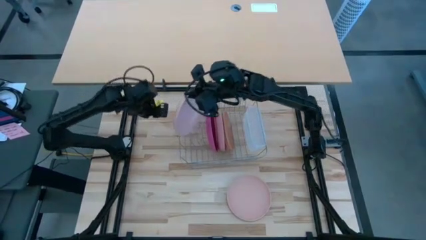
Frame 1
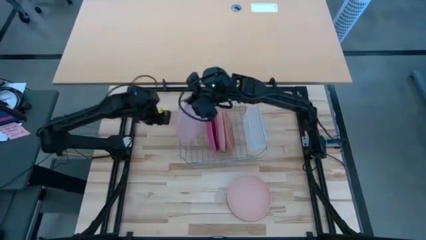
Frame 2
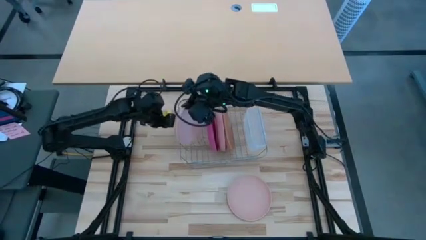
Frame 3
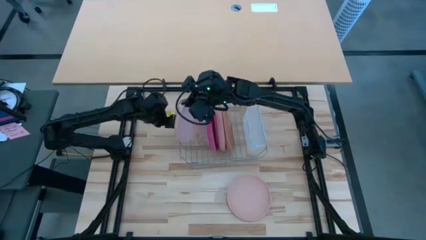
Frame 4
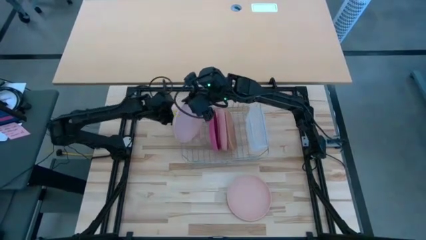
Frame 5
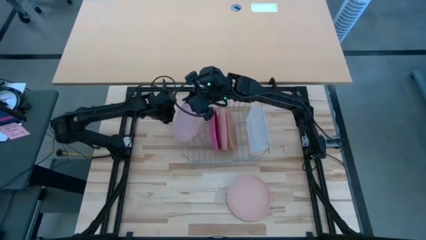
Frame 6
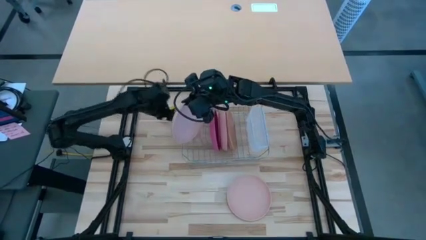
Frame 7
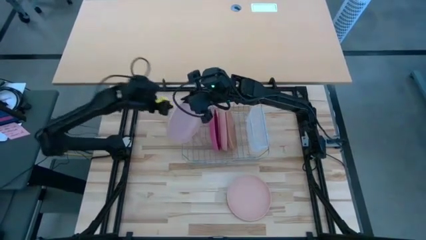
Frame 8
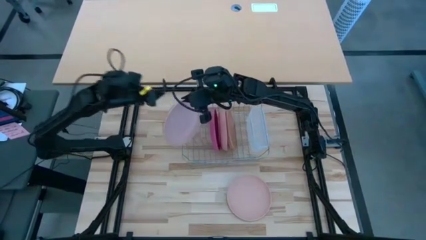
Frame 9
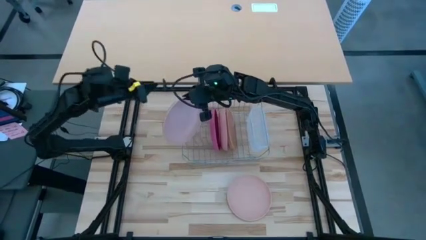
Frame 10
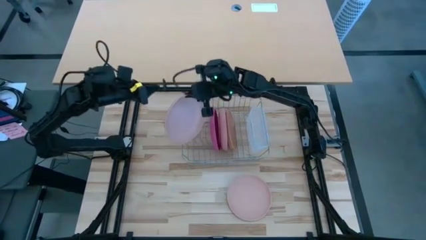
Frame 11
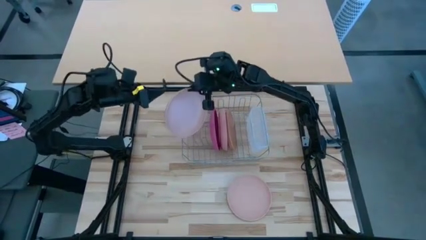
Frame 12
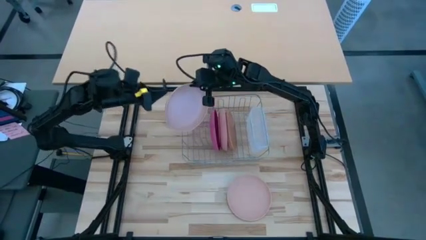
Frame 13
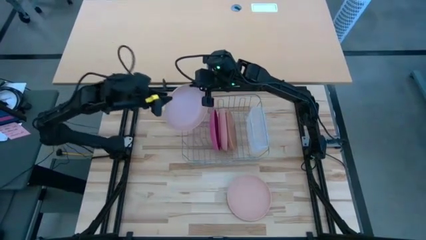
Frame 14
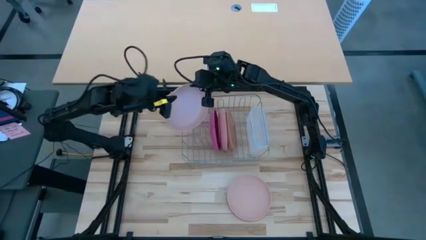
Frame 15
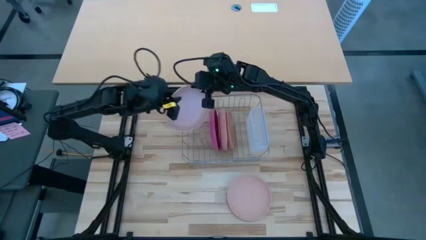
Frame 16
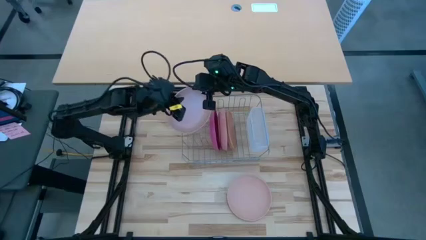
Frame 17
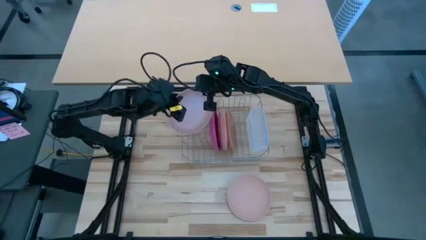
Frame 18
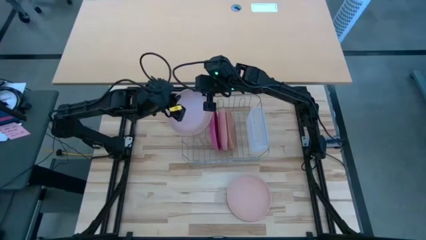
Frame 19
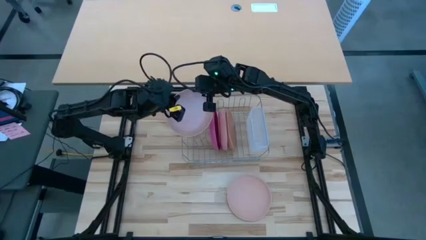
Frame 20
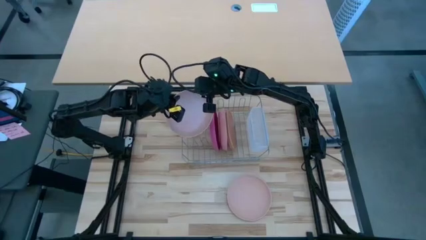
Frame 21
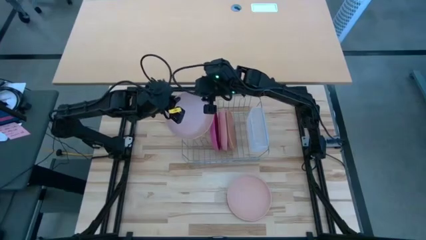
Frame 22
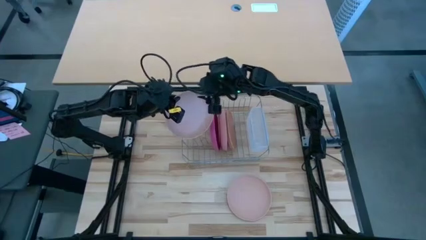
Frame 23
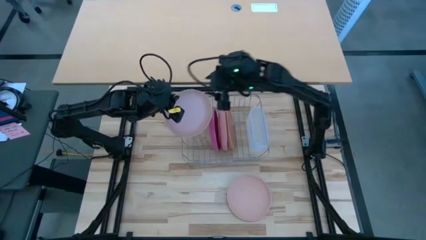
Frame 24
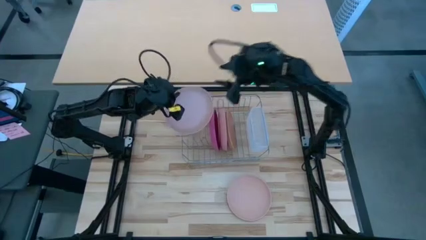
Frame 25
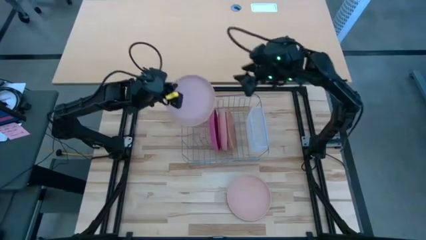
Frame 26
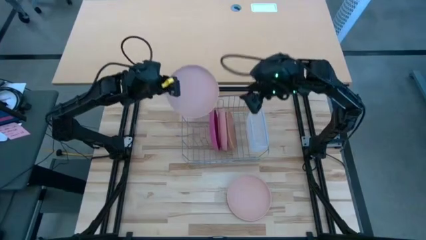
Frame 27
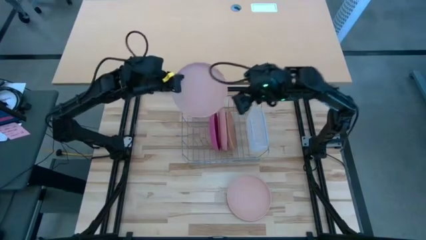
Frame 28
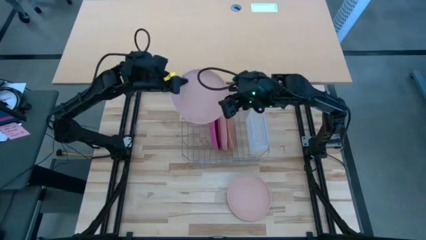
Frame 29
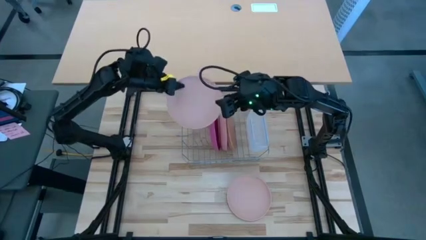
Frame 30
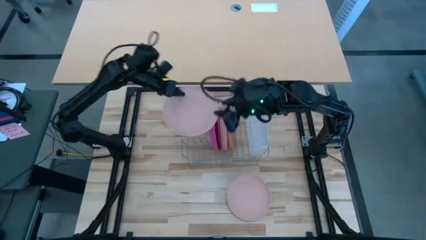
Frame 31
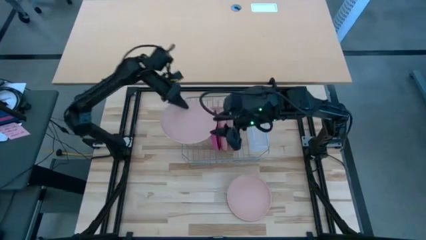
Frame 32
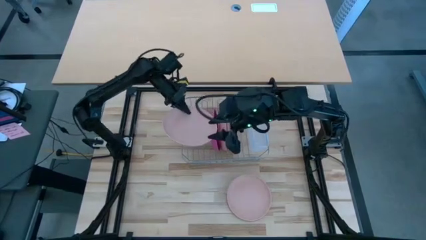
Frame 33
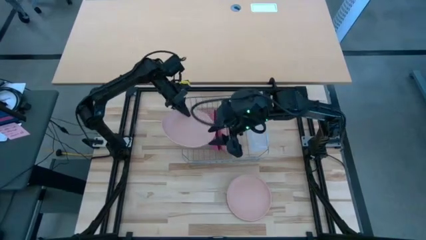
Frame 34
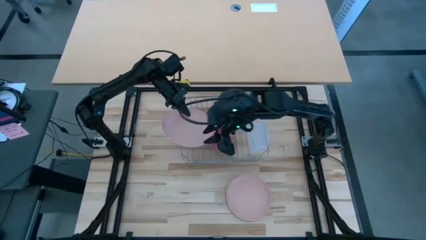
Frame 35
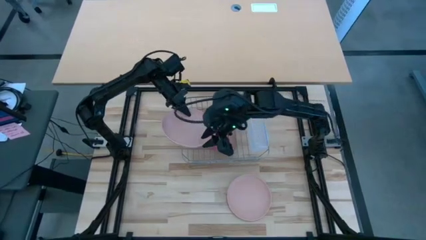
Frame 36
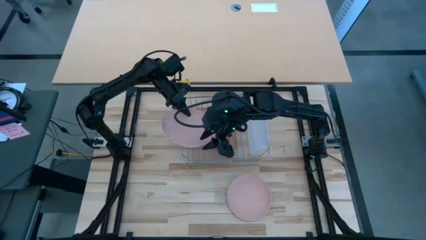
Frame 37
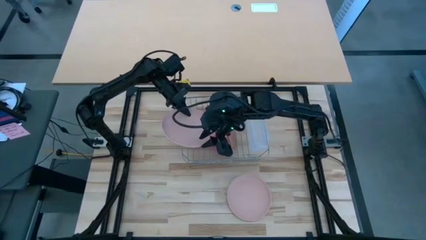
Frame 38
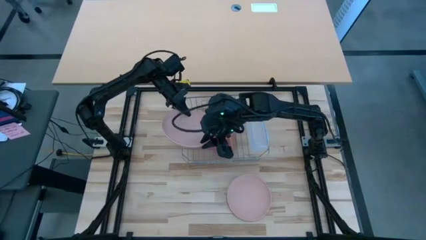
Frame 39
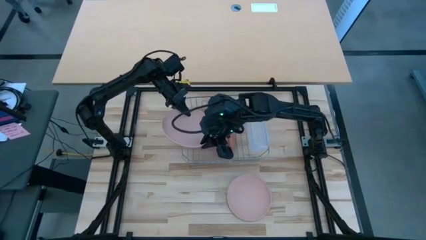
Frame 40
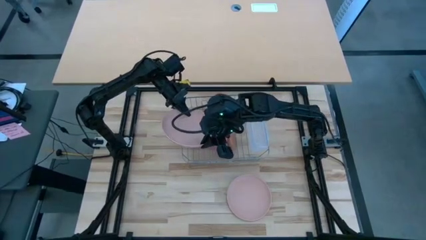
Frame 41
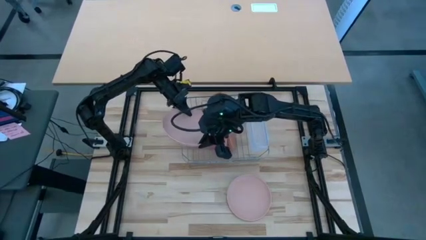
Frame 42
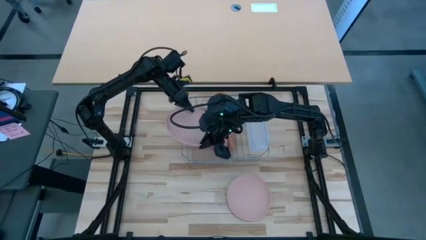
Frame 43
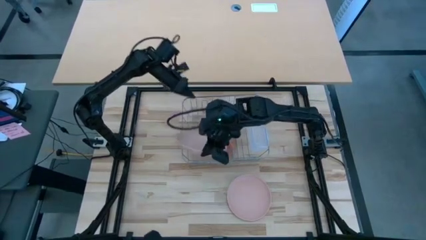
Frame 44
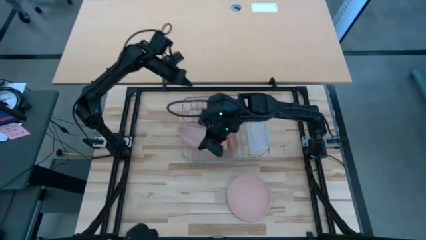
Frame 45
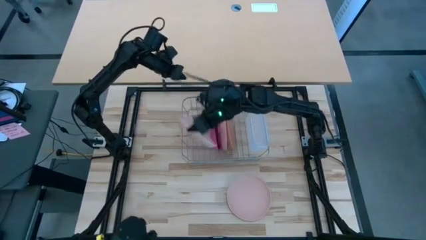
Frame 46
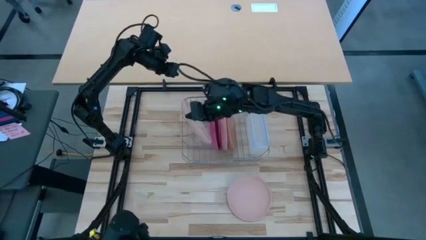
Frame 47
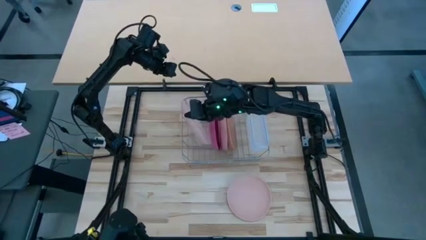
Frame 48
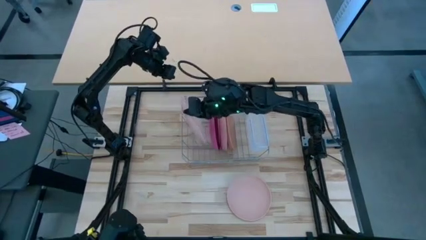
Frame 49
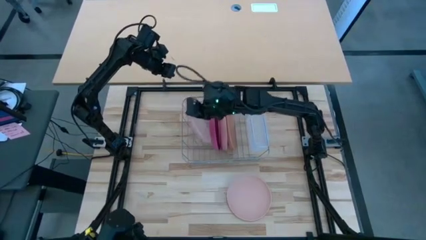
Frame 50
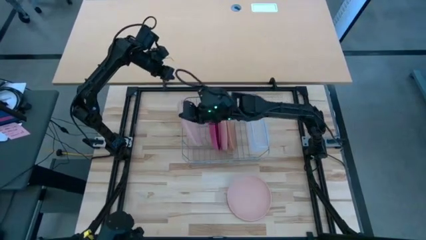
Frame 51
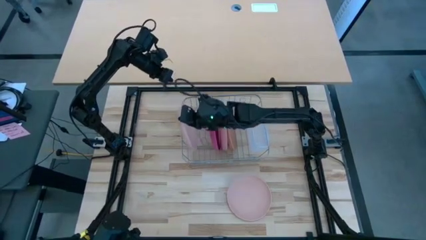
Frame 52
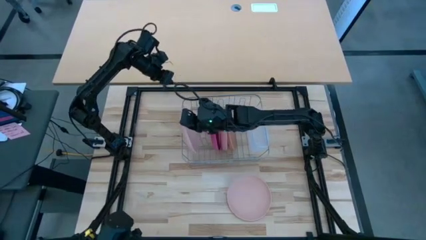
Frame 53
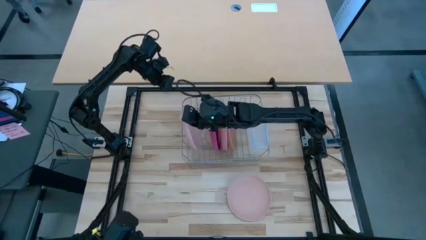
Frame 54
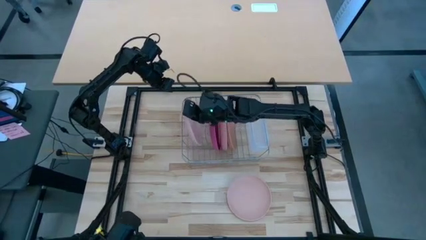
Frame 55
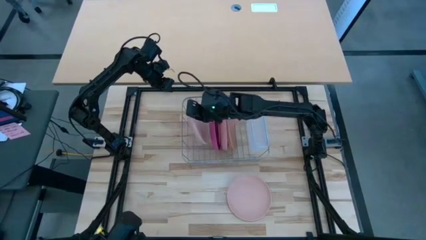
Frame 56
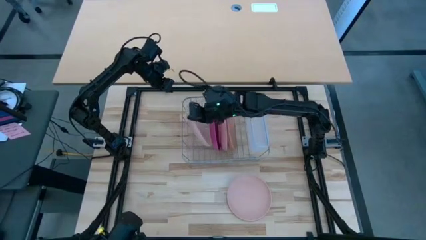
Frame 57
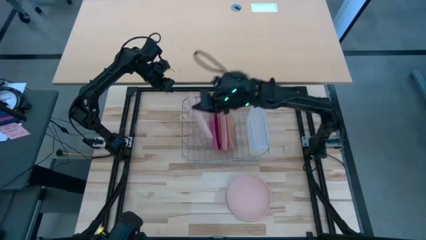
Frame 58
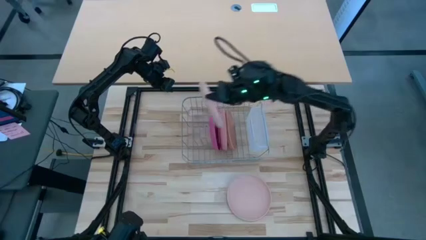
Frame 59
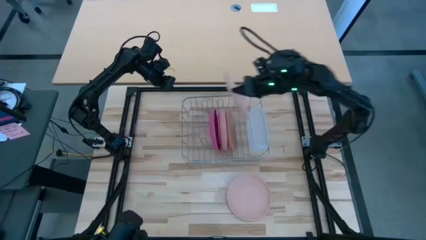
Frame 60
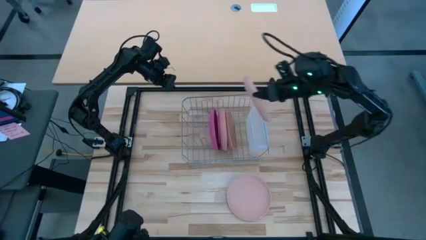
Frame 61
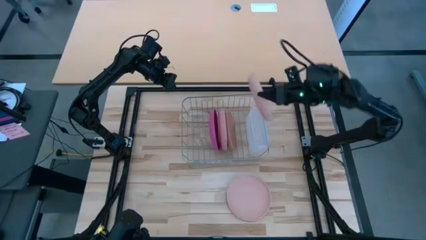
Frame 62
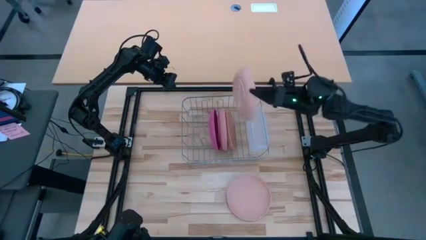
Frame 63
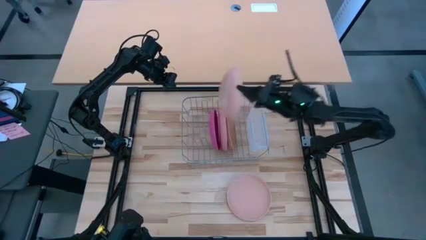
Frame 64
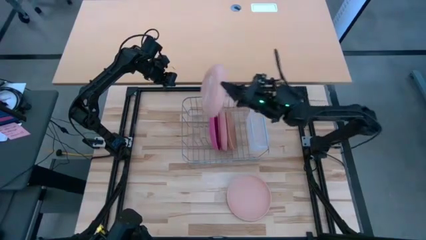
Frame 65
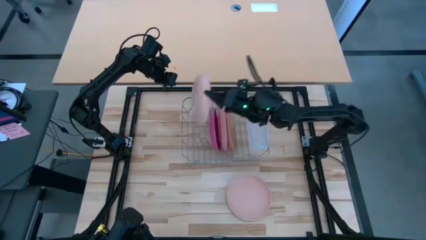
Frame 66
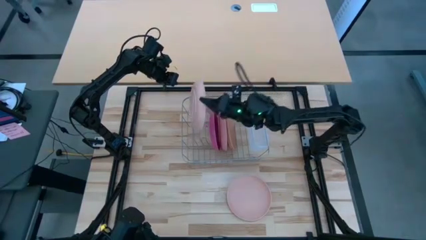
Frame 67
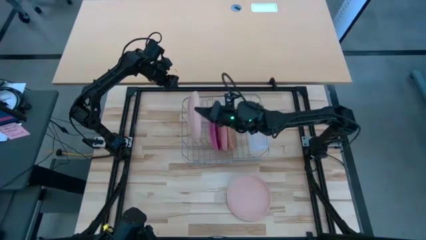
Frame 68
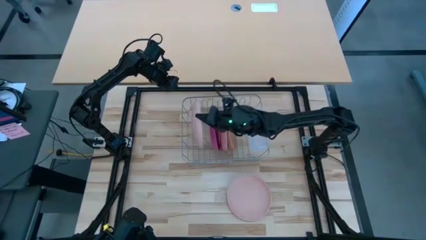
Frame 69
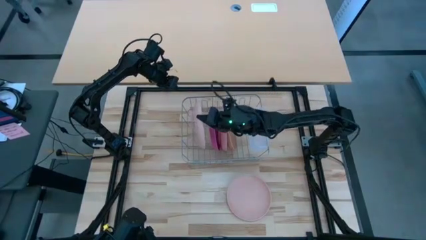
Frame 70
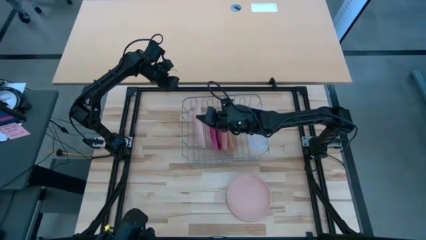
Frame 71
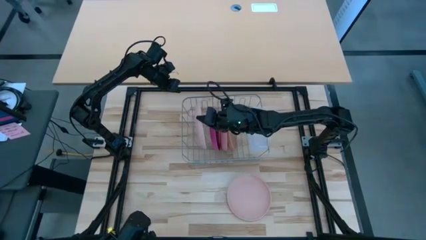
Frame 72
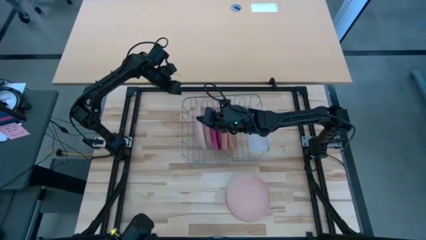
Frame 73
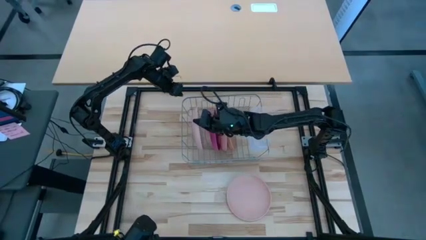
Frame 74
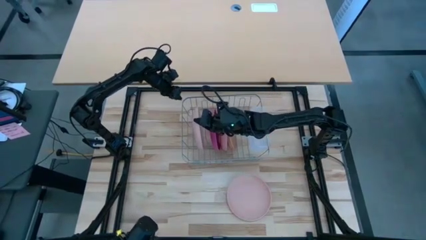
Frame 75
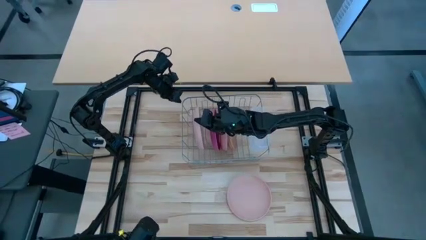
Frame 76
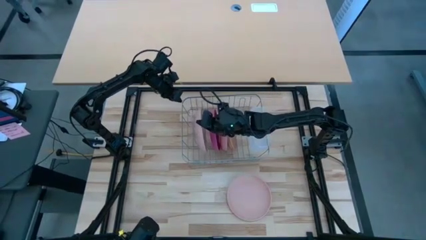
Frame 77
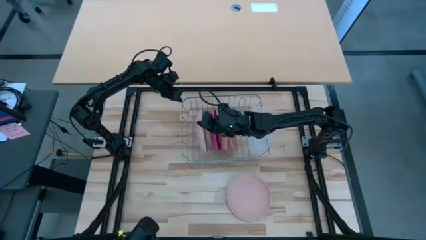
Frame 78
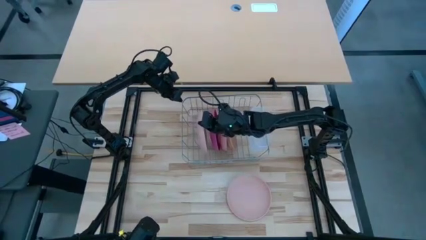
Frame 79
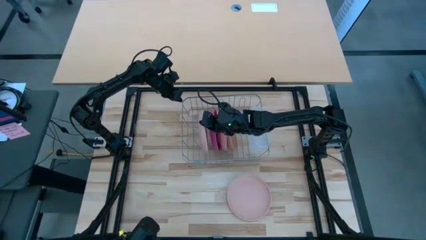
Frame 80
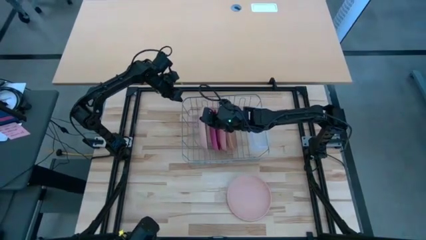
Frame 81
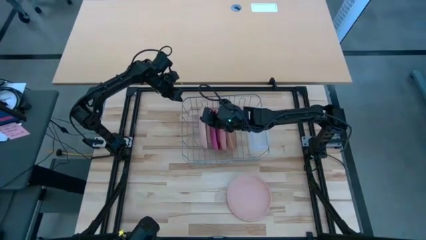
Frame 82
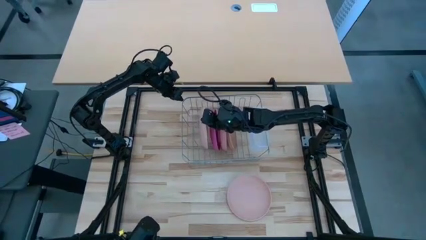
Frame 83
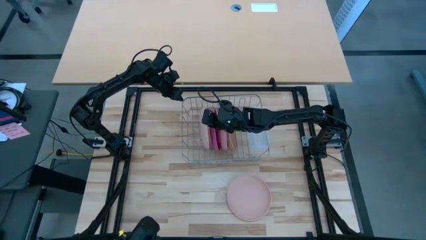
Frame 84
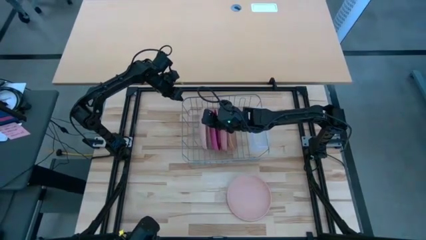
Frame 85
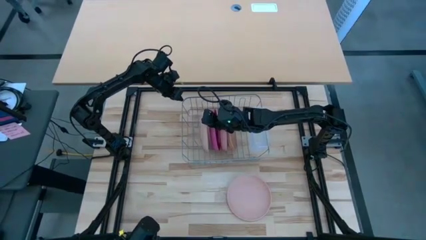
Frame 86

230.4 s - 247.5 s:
Task: Sort dishes
Put the top beige plate in the dish rack
